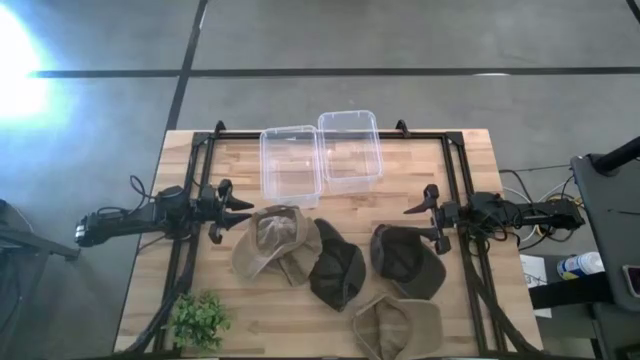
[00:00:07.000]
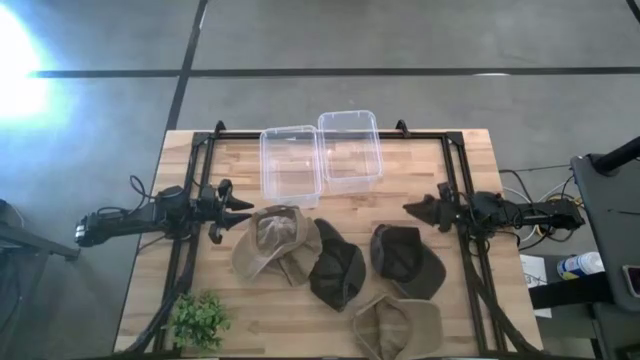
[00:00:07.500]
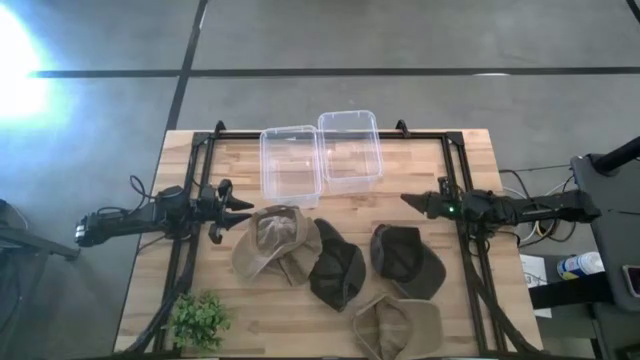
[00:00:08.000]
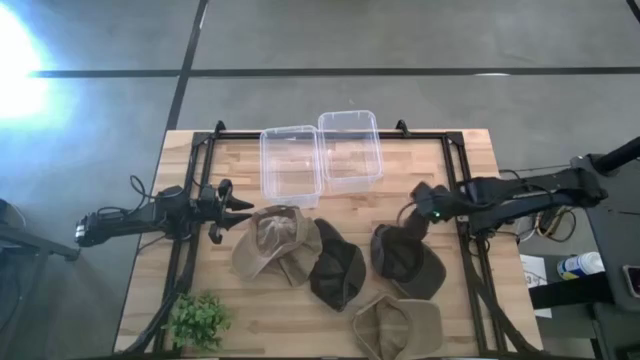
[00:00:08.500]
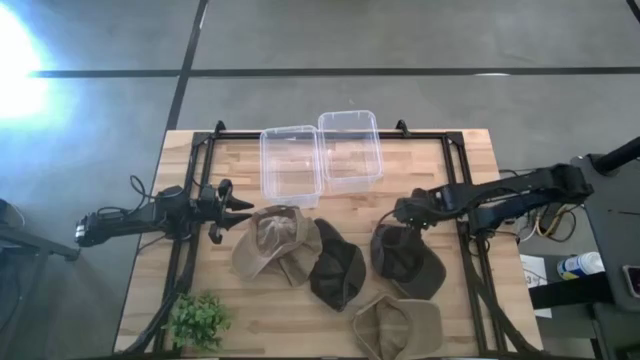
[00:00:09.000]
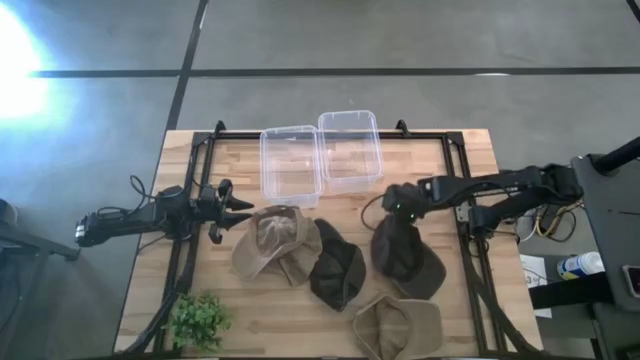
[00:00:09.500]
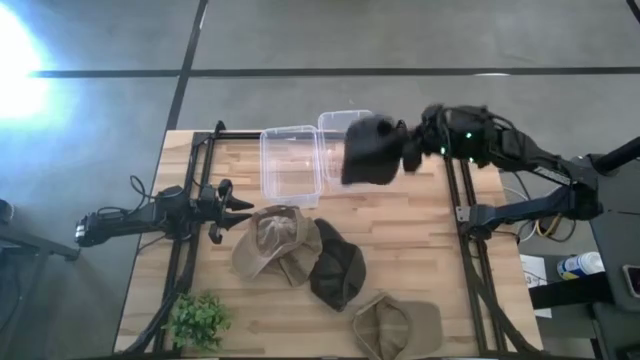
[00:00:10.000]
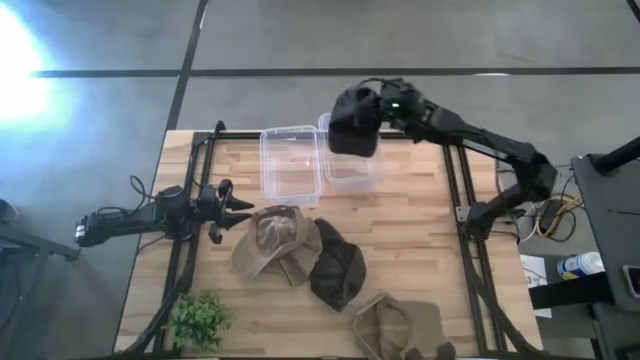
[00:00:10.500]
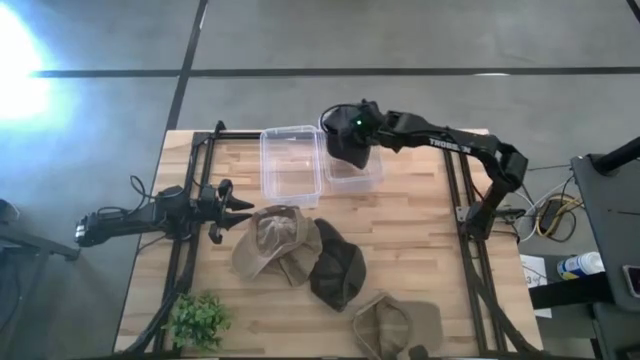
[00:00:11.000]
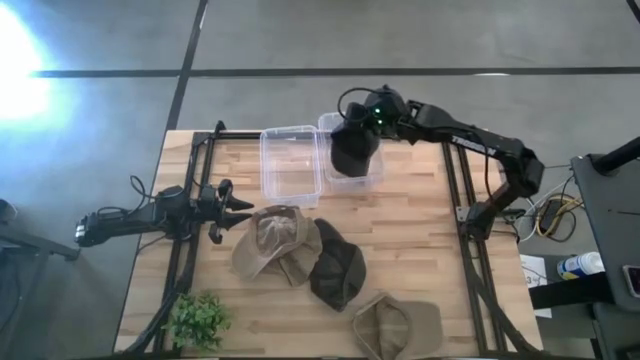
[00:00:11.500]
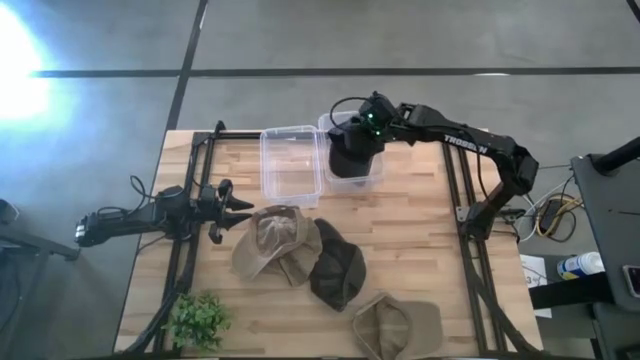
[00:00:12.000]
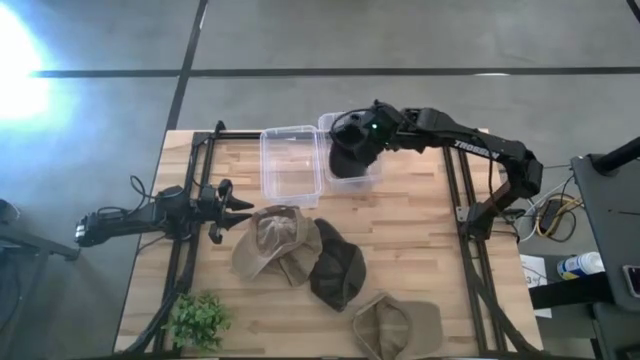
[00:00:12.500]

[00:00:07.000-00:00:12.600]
Task: Pick & Place hat
Put the right black cap into the right transparent bin

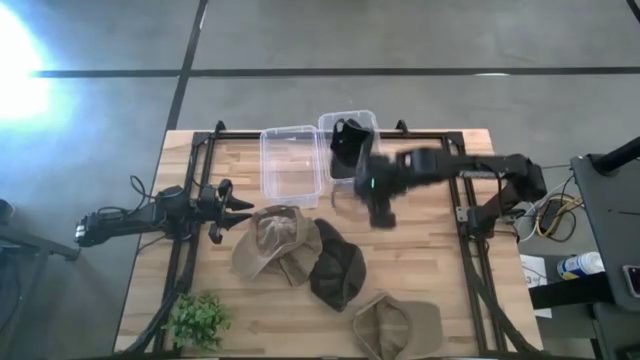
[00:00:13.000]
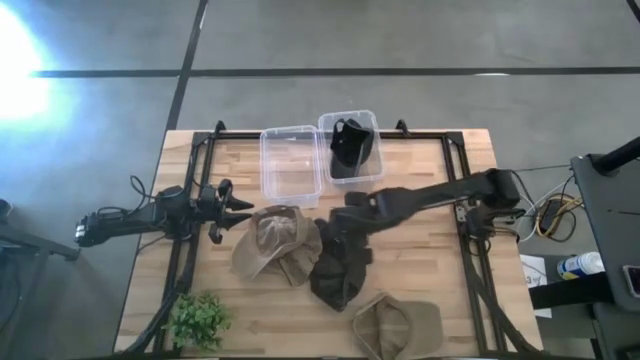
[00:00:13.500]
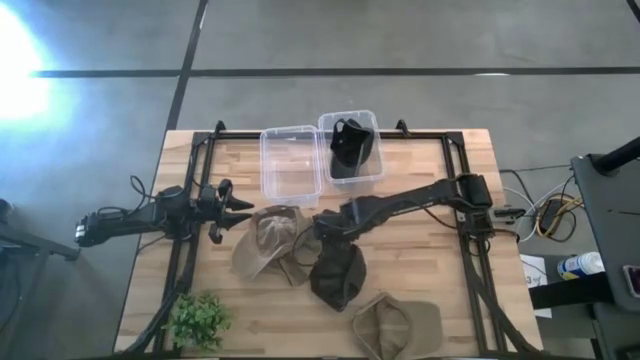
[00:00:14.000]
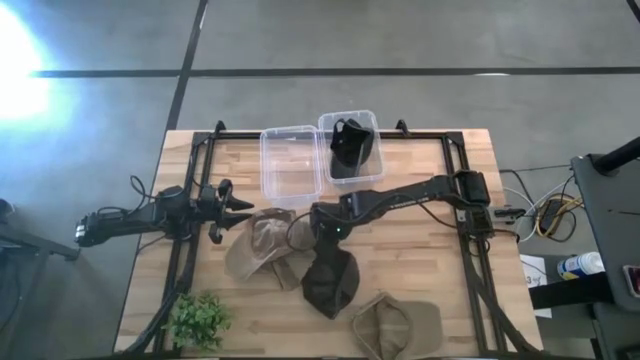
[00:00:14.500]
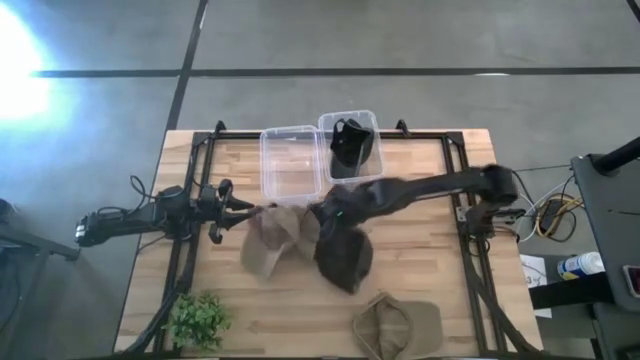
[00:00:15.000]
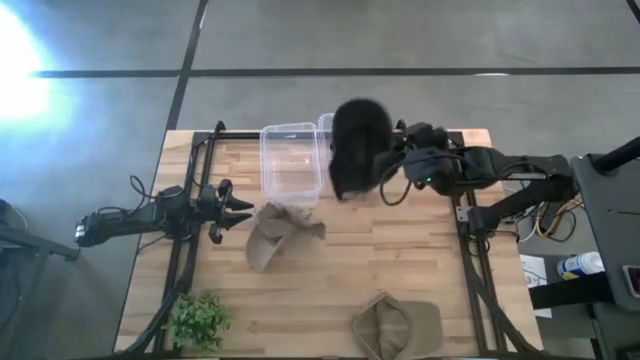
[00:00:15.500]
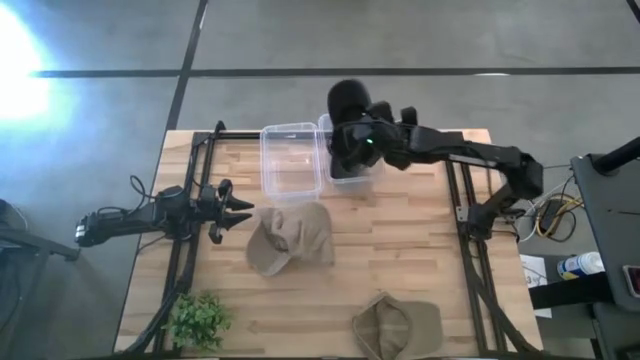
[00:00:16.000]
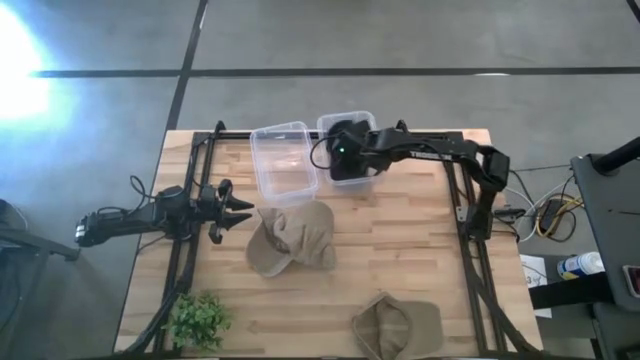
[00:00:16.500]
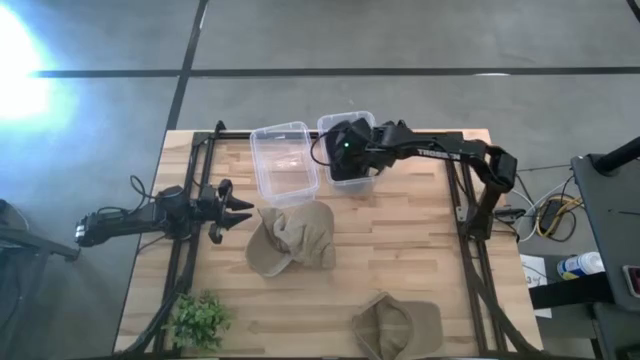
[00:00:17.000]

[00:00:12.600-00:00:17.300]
Put the black cap into the right transparent bin

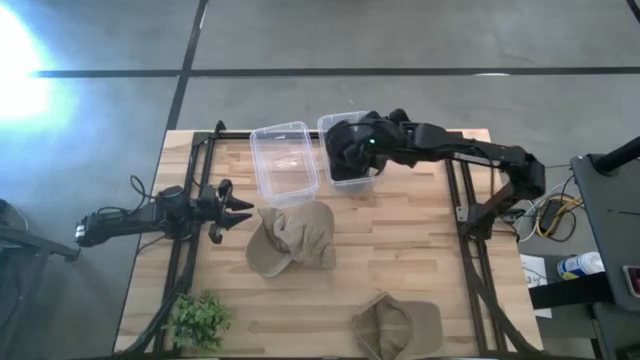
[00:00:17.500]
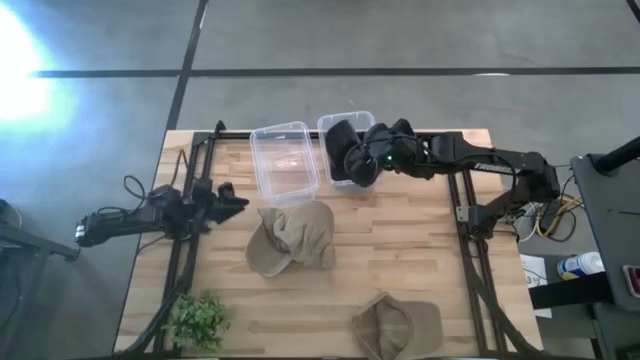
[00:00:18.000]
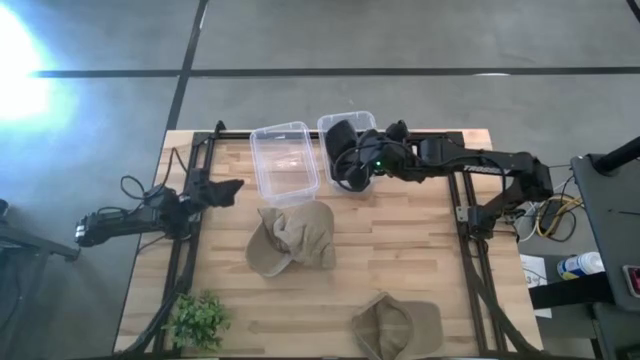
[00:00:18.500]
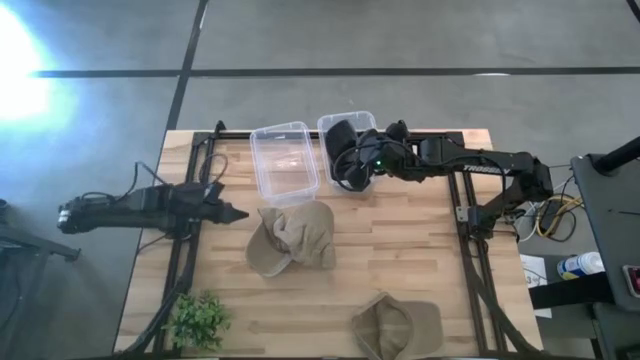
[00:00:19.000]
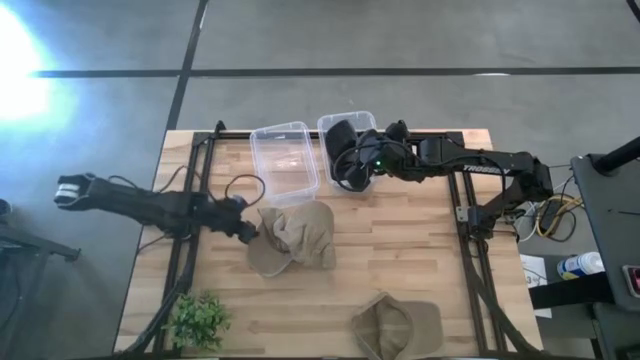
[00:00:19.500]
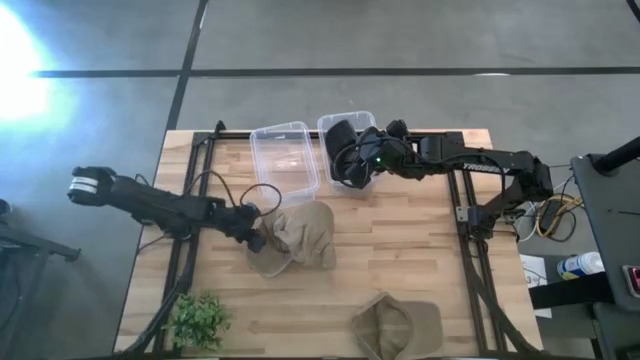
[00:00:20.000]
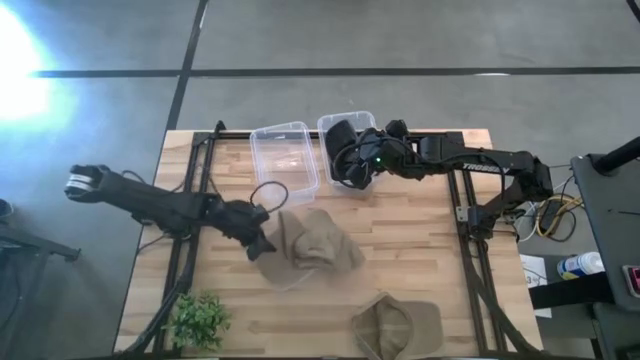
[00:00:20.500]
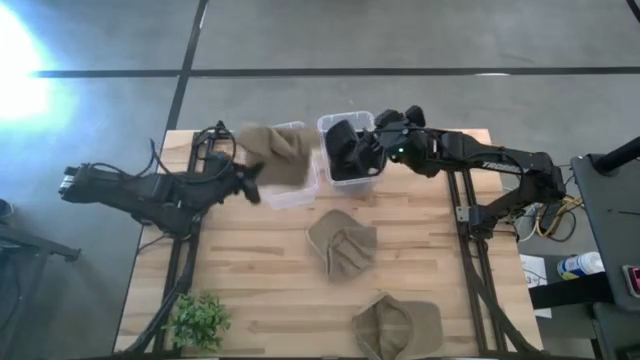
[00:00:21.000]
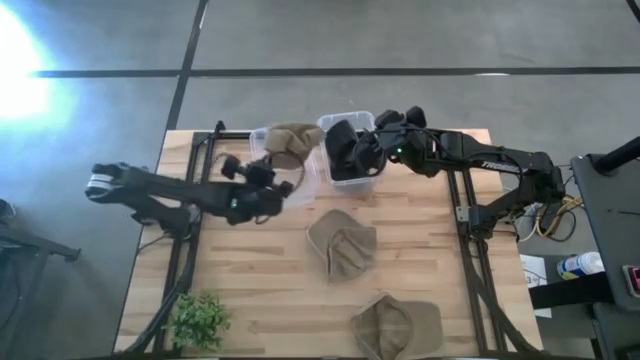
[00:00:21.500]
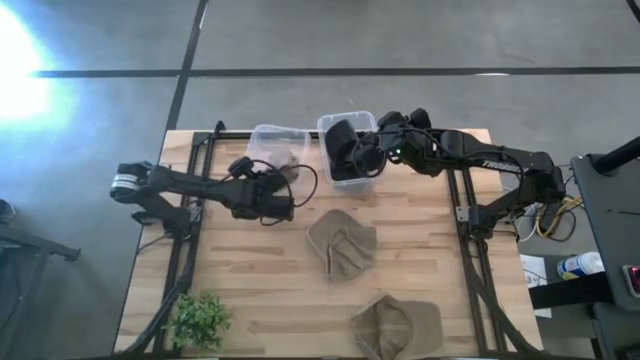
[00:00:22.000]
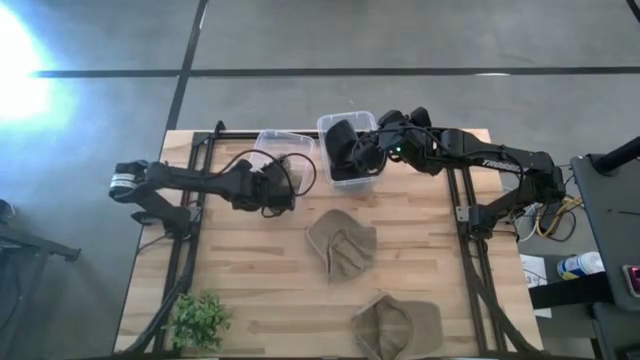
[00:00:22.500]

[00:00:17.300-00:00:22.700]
Put the left brown cap into the left transparent bin

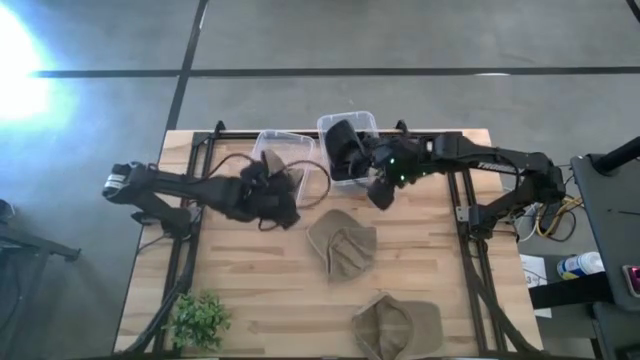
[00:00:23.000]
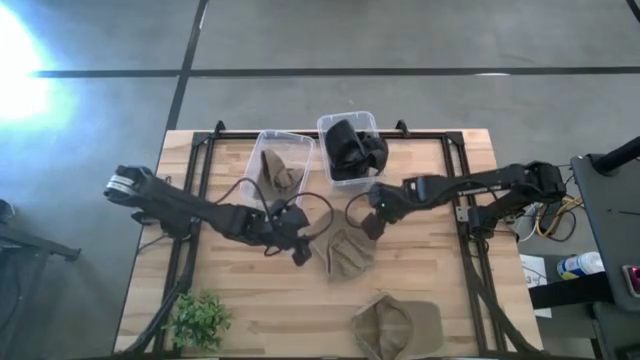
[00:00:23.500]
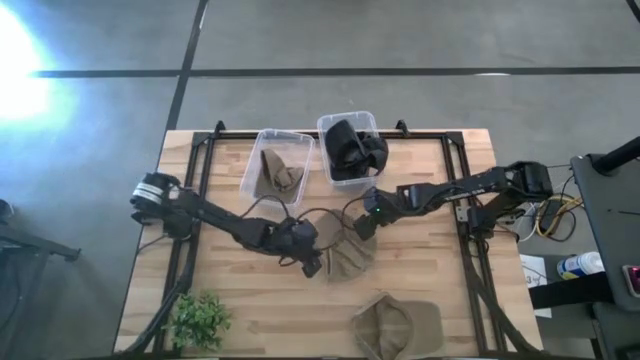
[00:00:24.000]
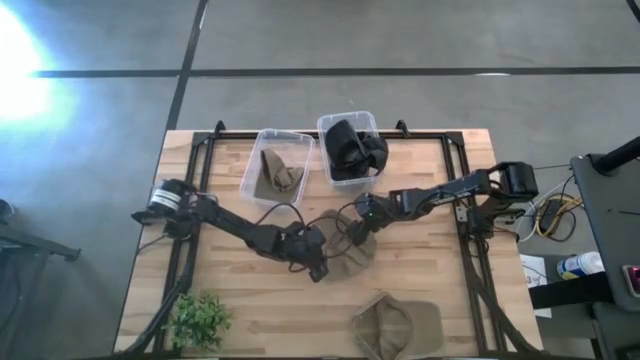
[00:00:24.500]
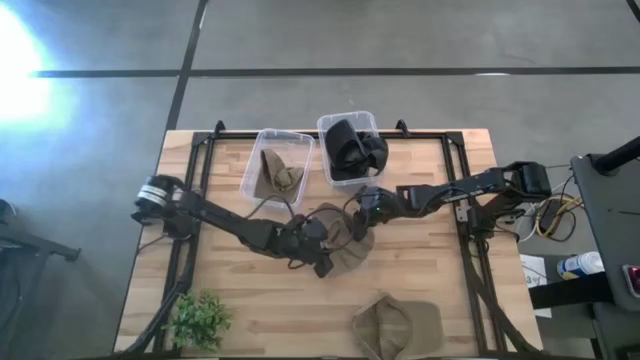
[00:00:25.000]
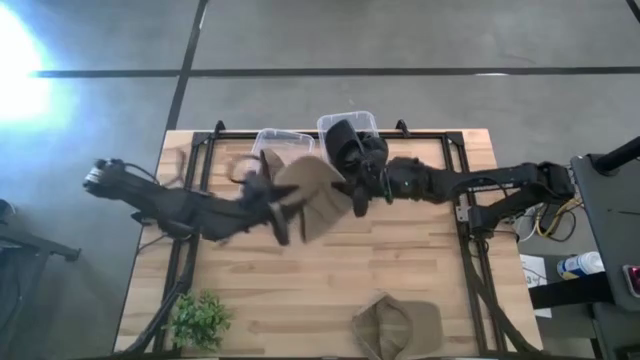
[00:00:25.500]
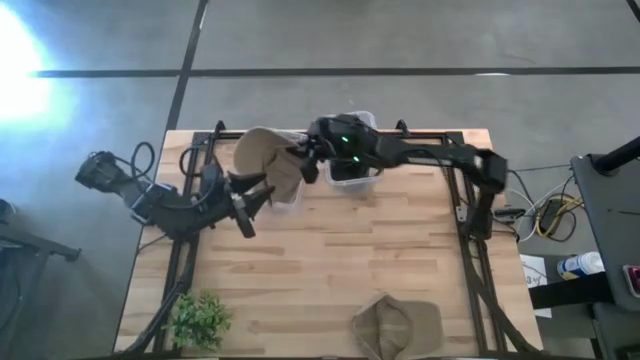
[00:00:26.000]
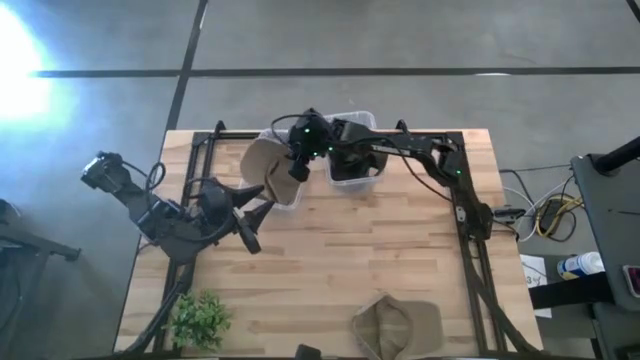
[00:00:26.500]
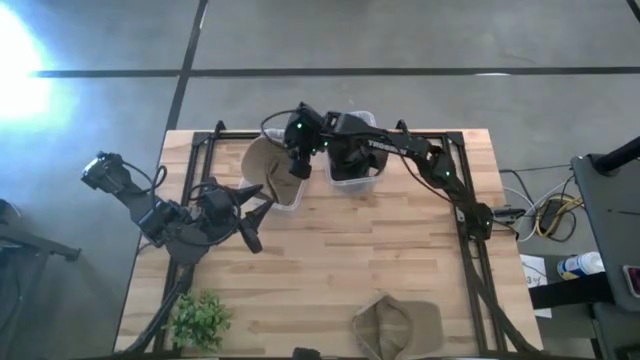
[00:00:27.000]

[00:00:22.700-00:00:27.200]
Put the top brown cap into the left transparent bin
